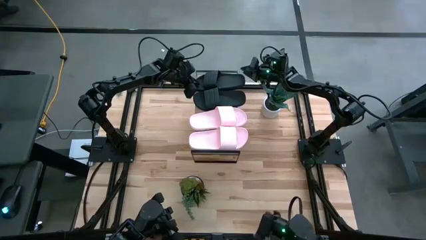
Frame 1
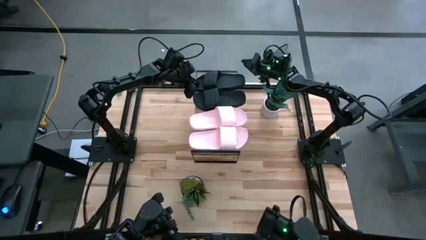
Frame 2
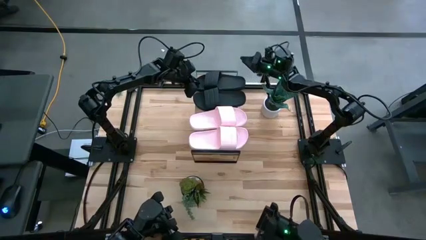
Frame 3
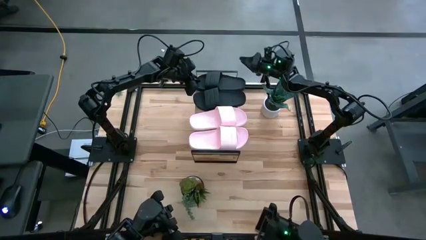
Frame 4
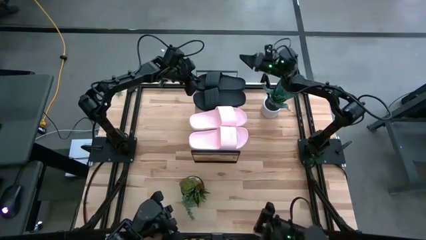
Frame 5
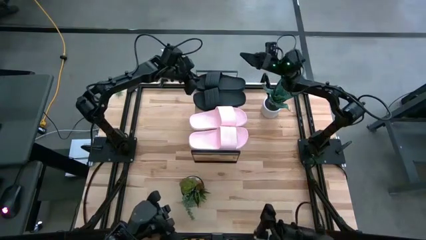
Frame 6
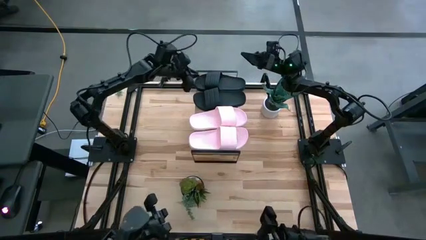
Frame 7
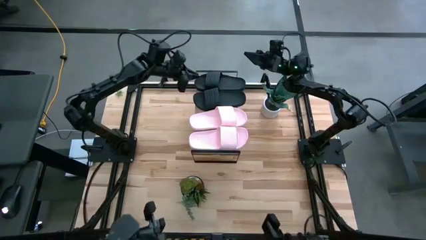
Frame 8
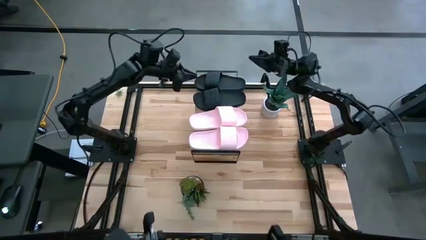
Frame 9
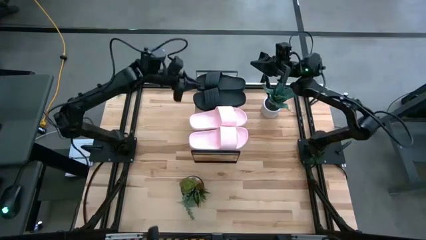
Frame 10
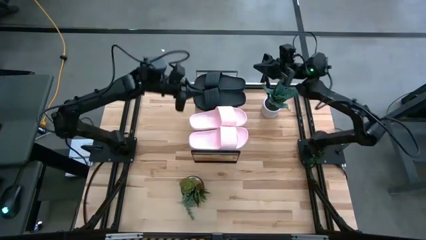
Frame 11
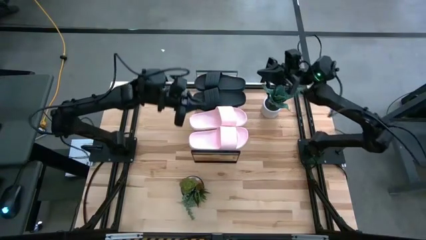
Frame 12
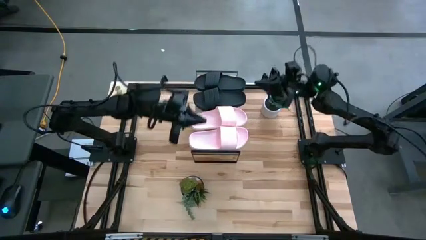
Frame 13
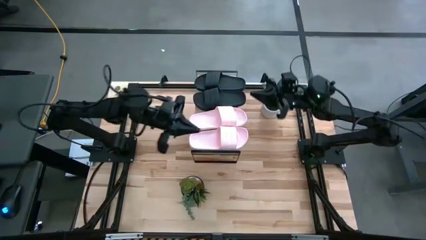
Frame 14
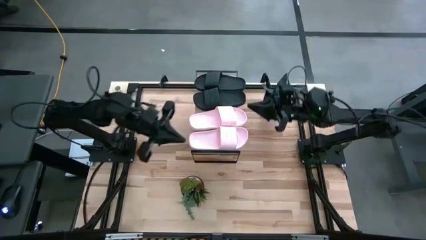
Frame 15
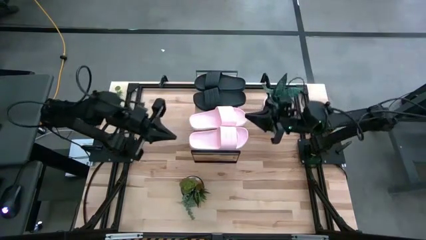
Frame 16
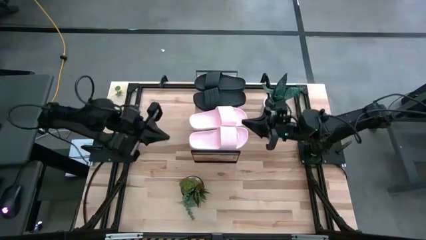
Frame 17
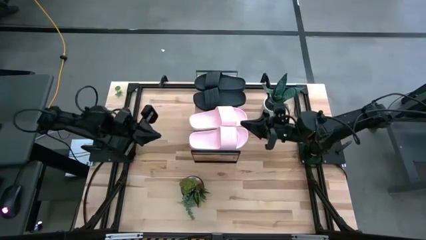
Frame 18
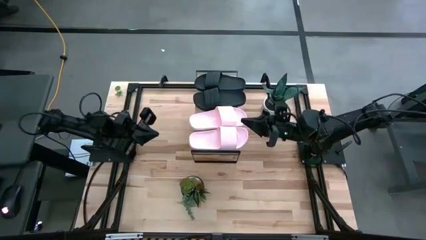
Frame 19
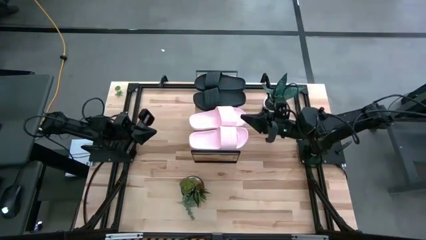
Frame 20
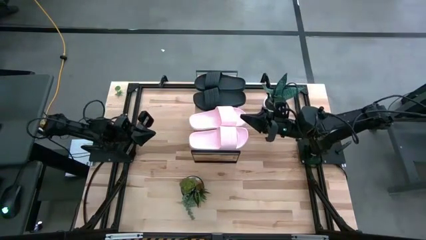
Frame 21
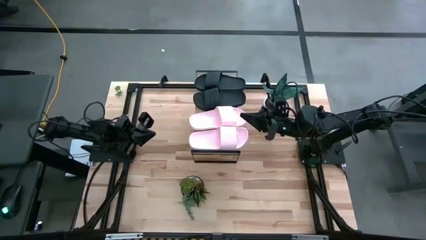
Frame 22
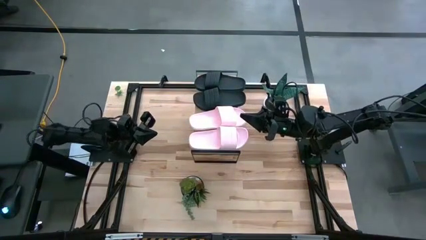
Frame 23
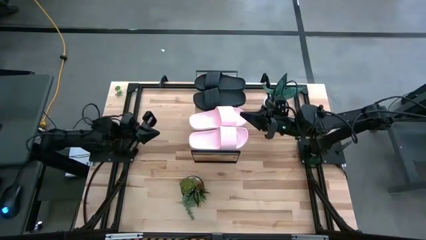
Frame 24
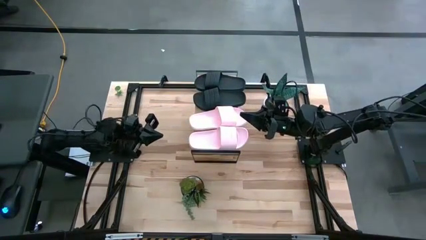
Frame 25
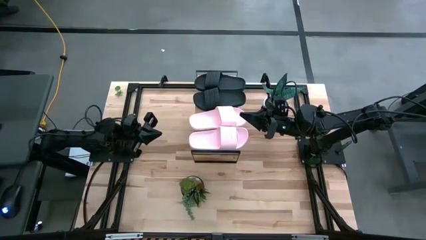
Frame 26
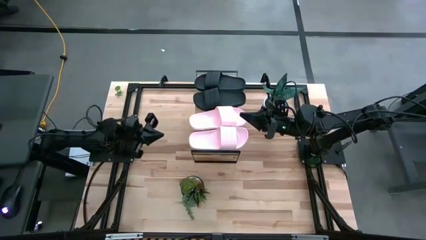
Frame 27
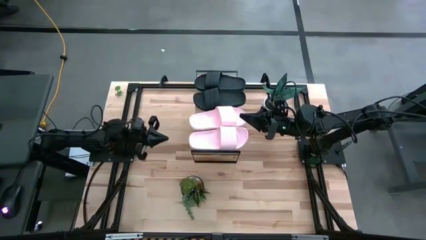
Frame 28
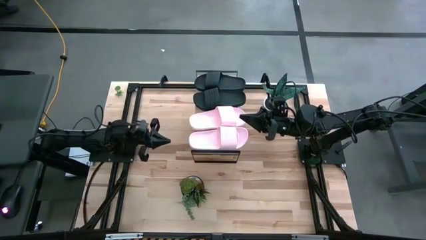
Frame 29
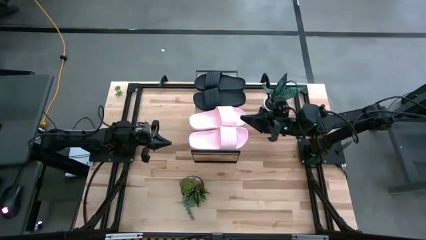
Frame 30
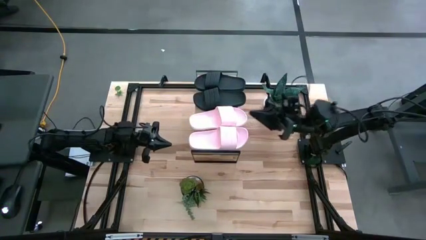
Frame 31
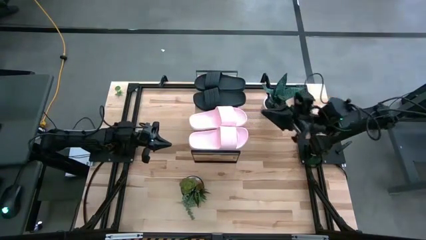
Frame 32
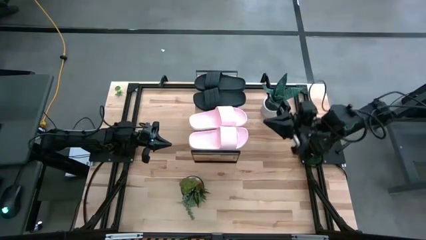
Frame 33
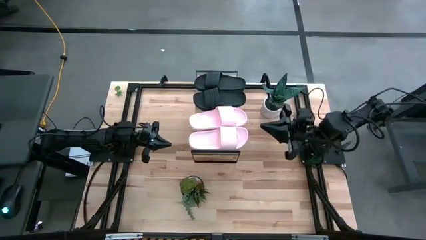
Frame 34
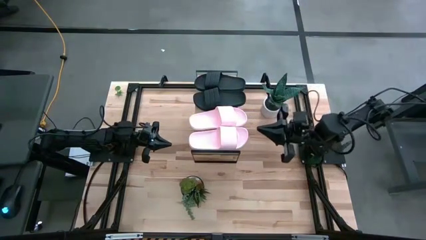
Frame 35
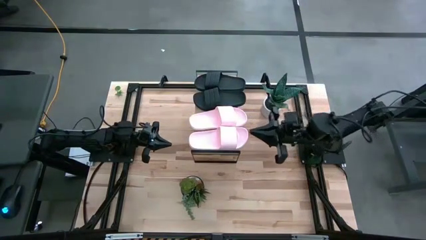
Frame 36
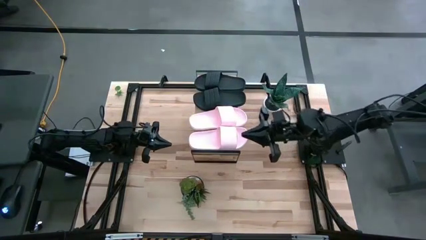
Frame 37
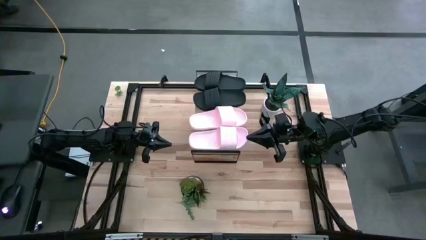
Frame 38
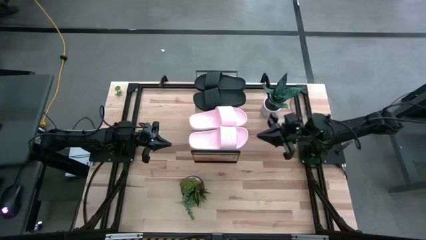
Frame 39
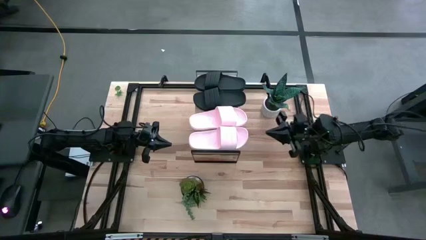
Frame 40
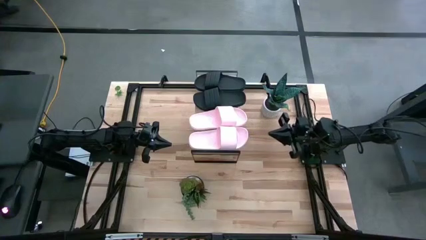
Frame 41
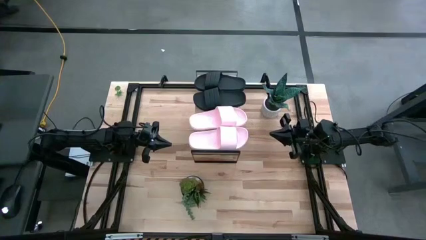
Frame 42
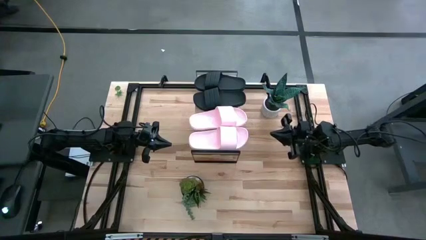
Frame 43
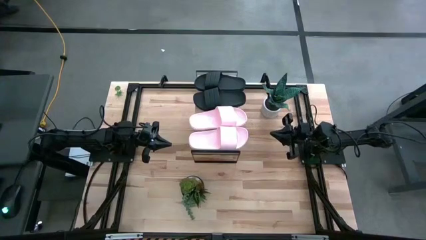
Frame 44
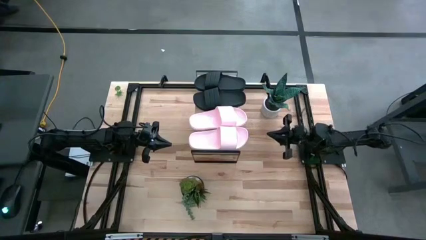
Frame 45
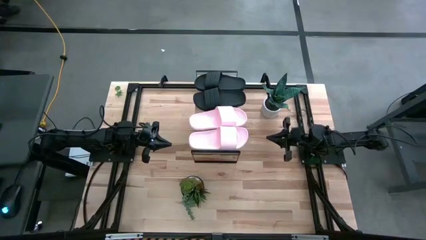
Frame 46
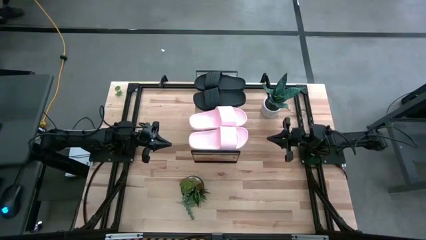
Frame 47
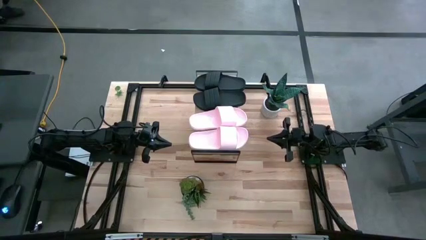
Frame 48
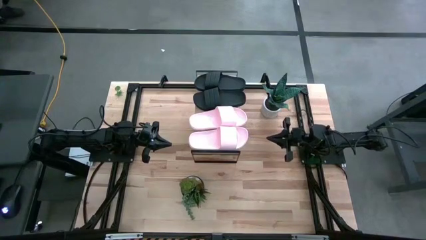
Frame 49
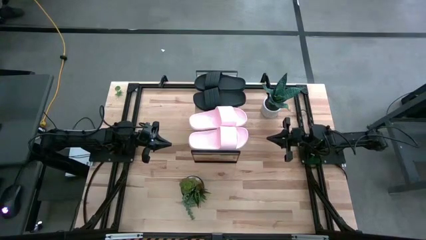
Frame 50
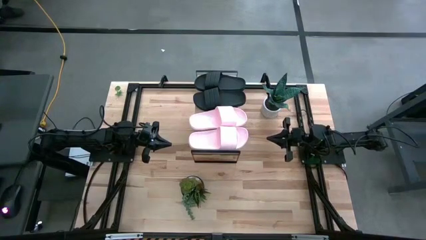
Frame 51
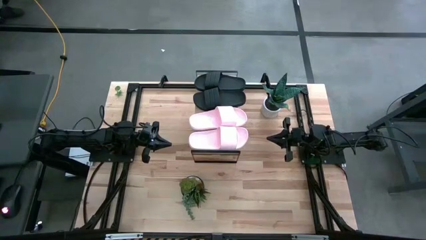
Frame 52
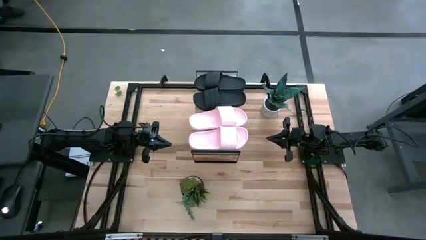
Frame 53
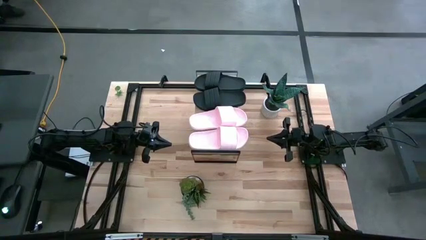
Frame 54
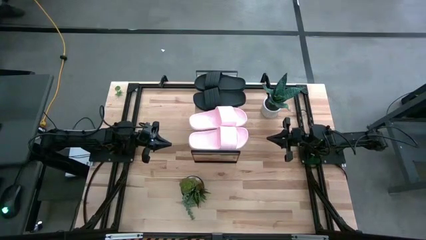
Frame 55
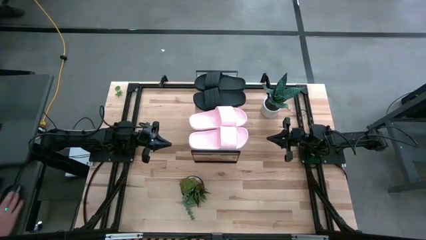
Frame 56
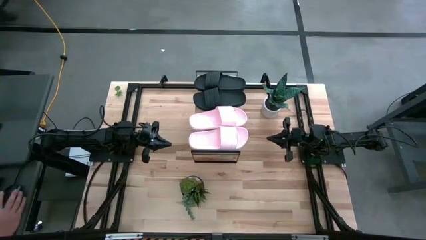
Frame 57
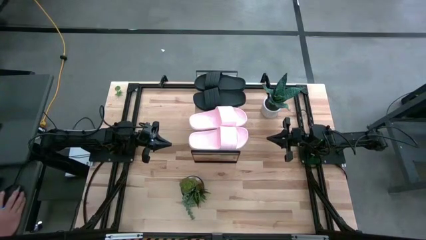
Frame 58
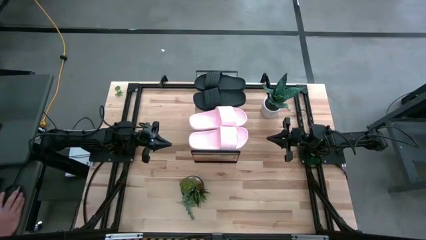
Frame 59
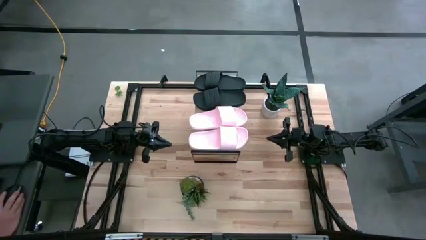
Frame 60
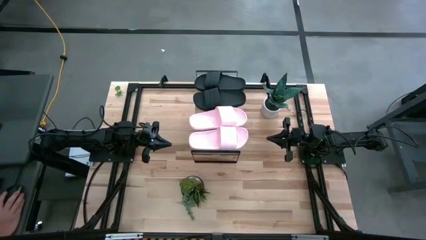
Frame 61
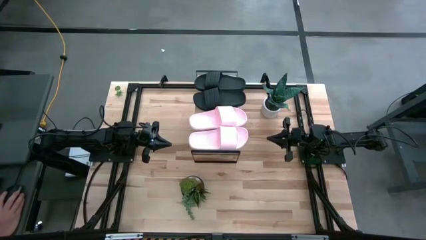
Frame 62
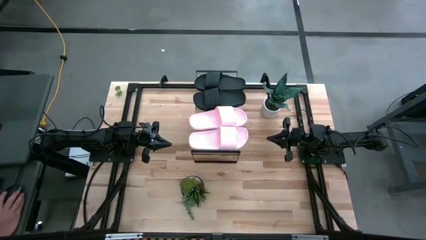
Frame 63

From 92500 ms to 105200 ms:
Task: Pick and place slides into the shelf
Return to Home Position
